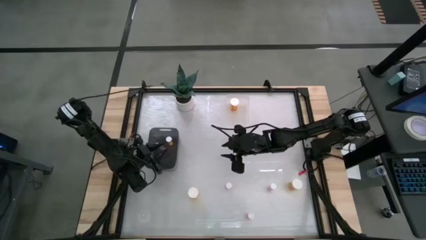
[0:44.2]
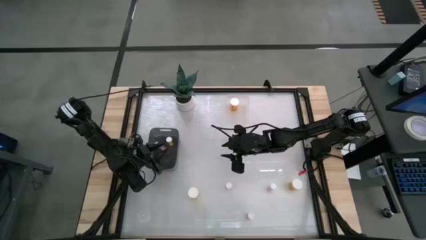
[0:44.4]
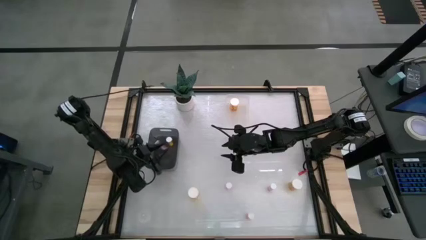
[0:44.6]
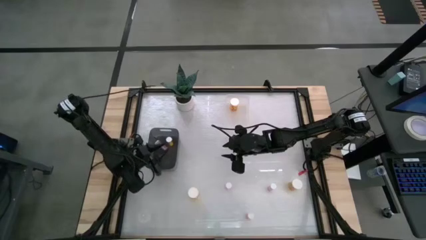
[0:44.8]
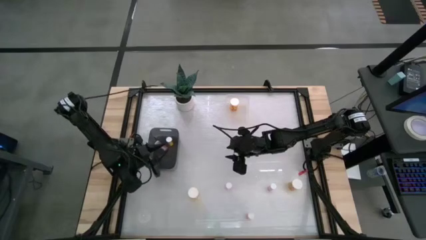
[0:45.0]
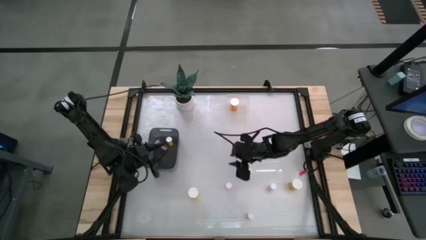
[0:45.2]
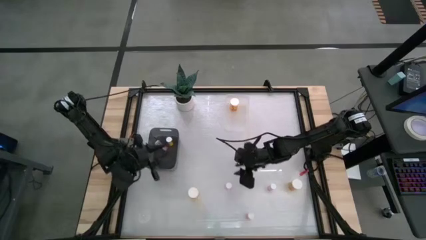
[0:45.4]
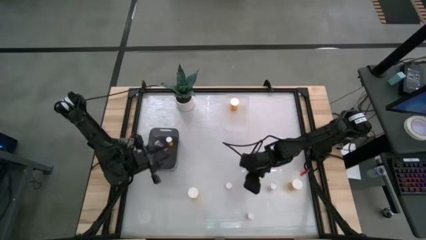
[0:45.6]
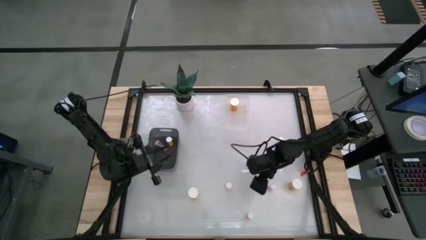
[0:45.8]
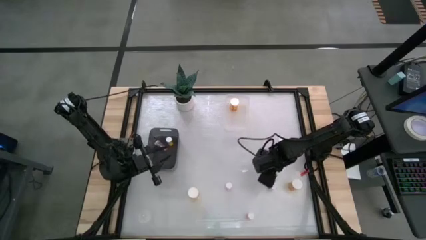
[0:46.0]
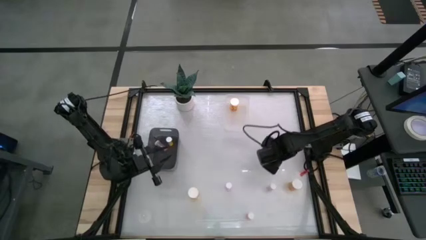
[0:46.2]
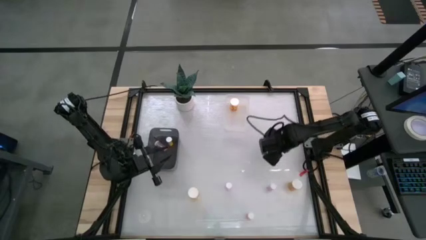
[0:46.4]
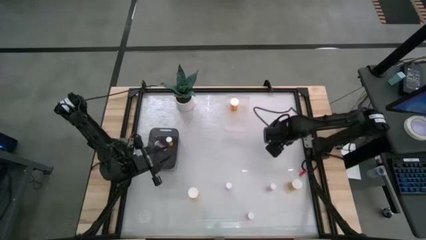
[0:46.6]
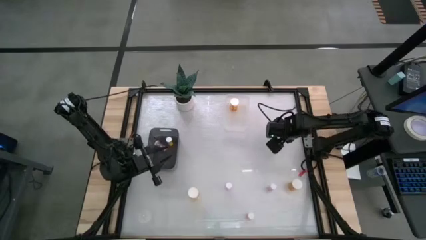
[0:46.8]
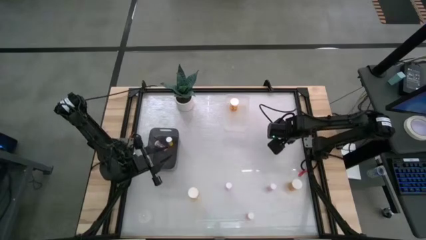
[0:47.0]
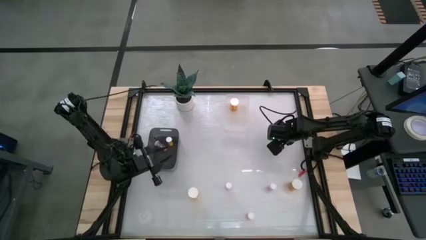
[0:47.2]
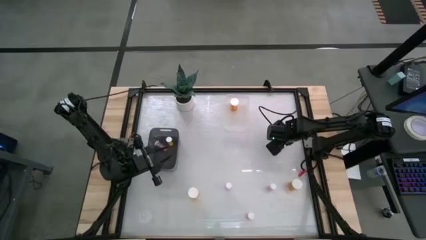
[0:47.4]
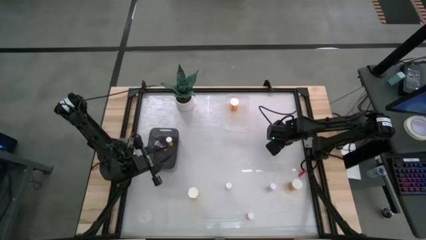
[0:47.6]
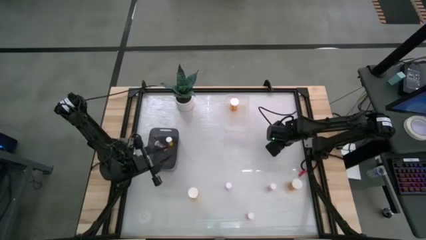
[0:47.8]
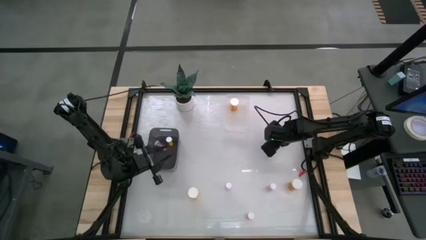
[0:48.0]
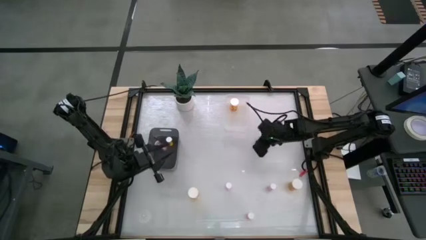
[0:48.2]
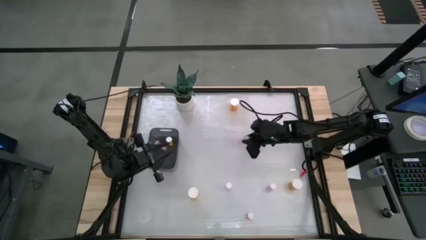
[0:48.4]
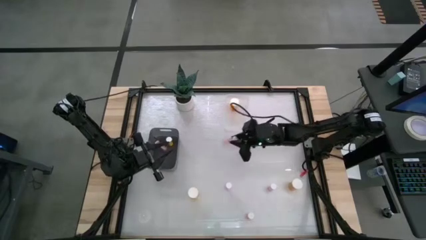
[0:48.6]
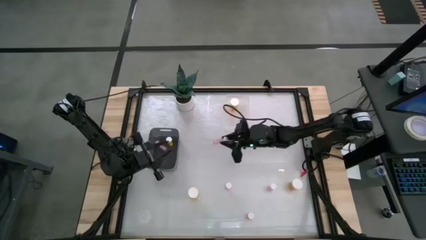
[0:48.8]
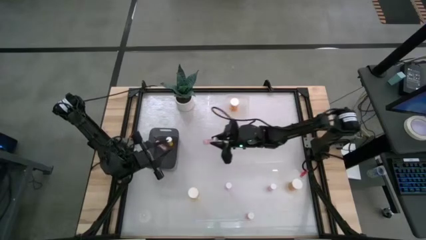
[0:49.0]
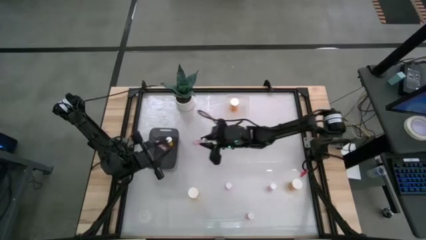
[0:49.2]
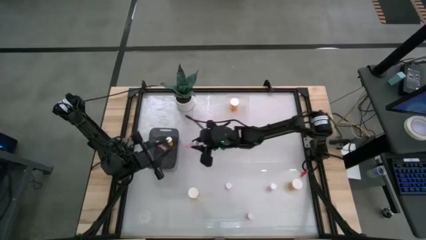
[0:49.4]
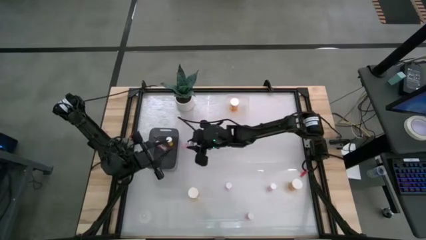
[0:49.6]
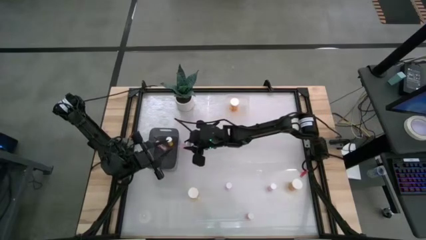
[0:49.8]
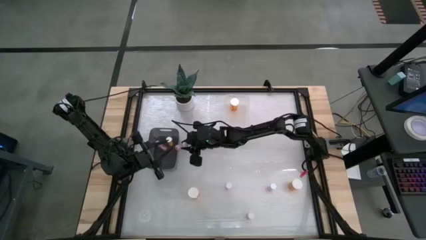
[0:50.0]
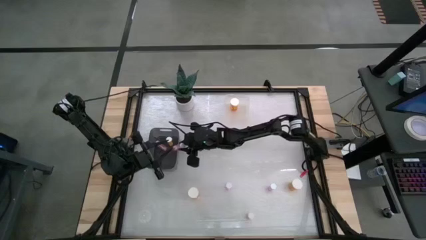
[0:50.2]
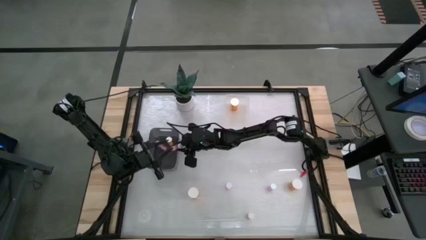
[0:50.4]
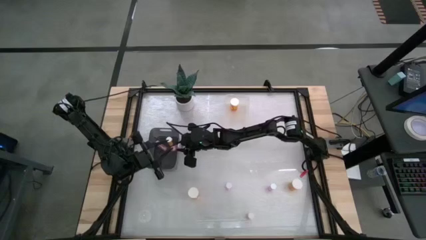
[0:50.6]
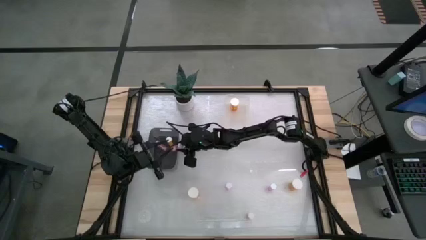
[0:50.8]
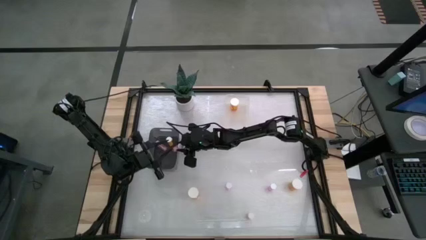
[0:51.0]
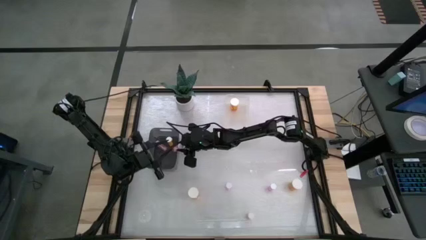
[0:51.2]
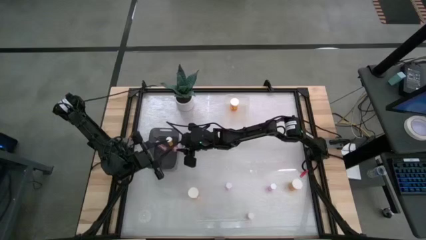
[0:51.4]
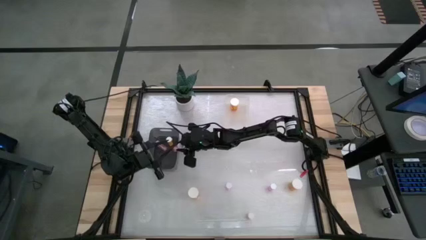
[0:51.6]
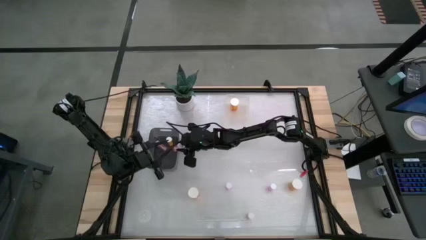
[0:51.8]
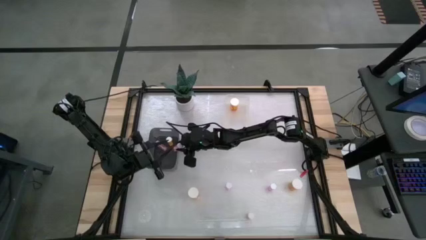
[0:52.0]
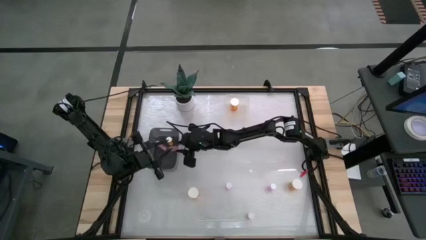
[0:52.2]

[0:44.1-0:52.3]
Task: Pick and place medicine bottles into bin by pill shape (circle, oval)
Put the small pink pill bottle into the black bin
